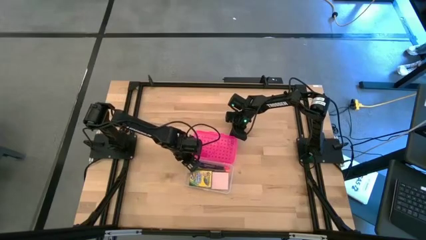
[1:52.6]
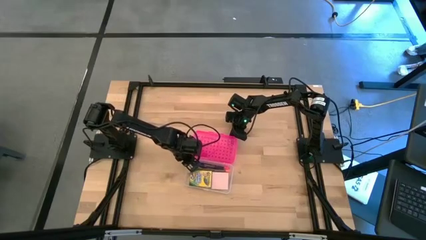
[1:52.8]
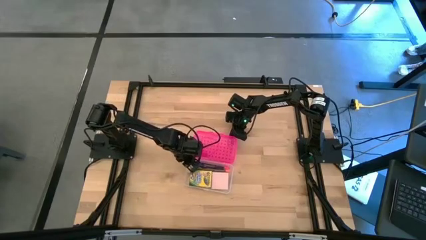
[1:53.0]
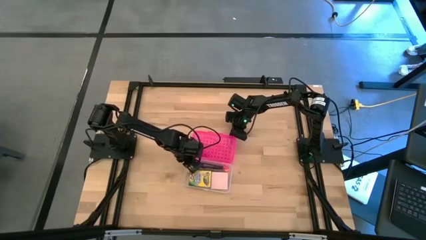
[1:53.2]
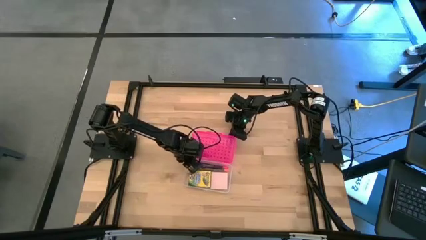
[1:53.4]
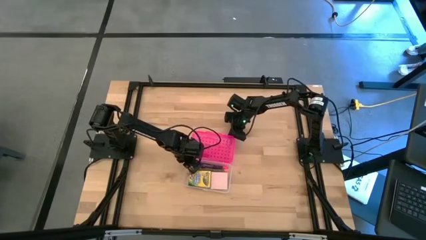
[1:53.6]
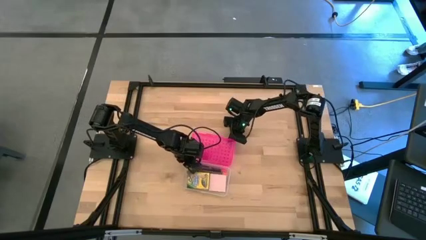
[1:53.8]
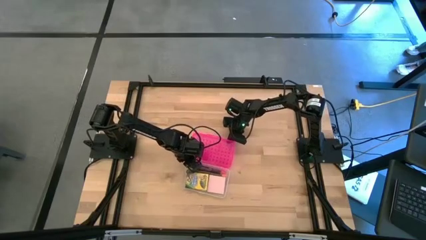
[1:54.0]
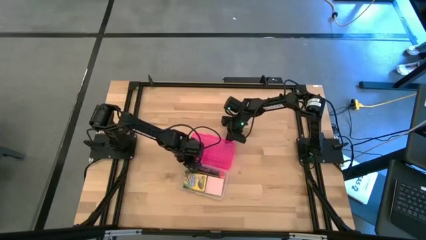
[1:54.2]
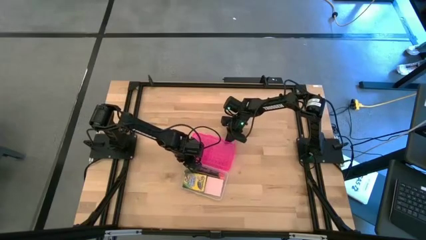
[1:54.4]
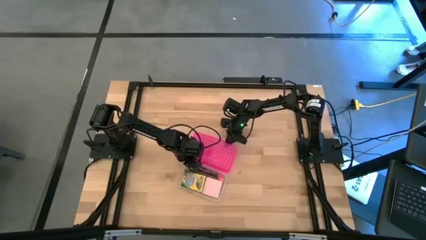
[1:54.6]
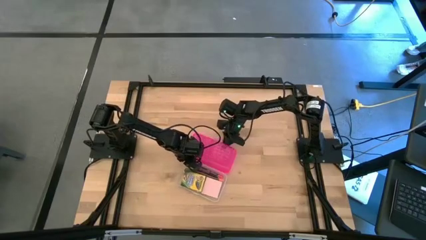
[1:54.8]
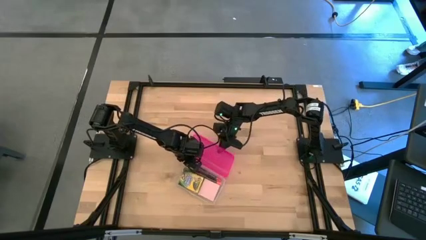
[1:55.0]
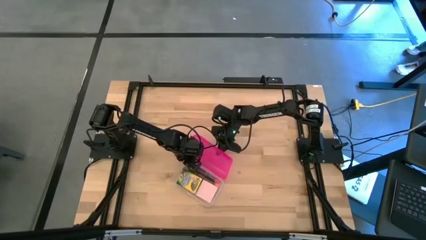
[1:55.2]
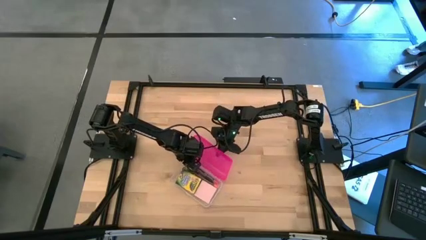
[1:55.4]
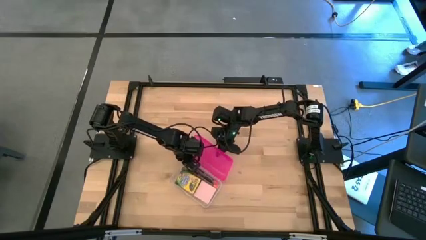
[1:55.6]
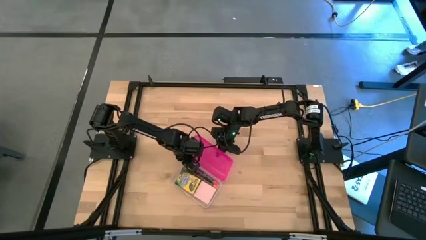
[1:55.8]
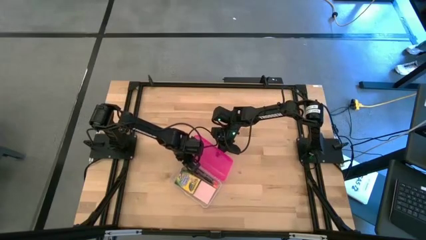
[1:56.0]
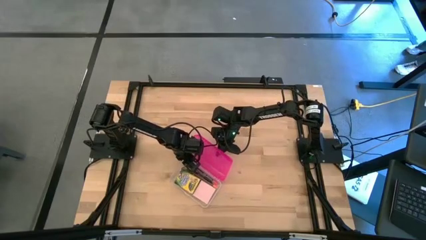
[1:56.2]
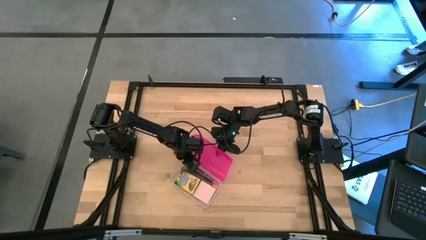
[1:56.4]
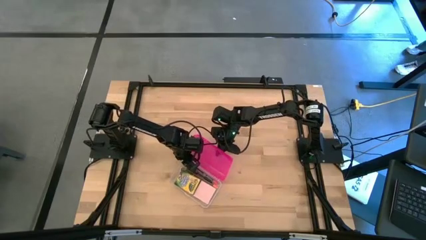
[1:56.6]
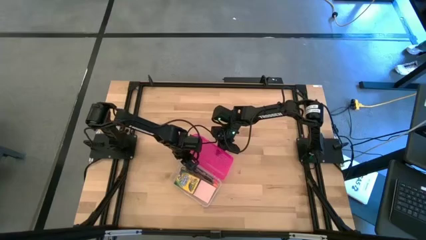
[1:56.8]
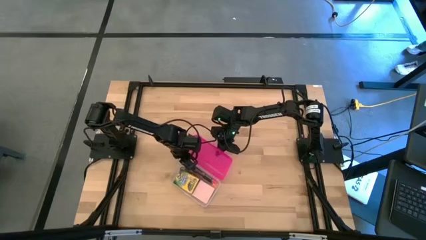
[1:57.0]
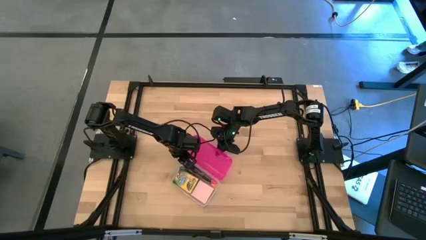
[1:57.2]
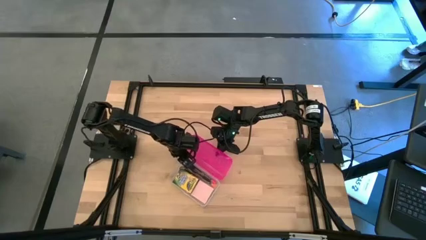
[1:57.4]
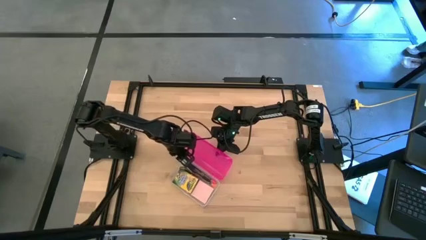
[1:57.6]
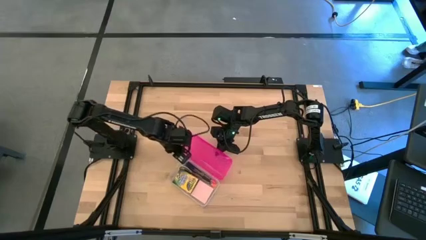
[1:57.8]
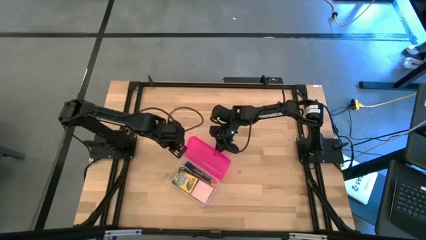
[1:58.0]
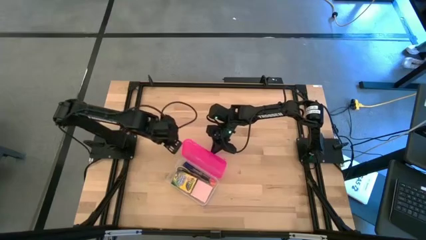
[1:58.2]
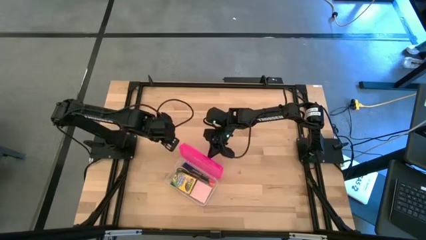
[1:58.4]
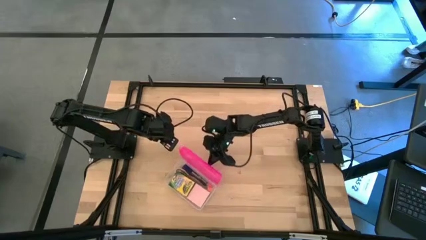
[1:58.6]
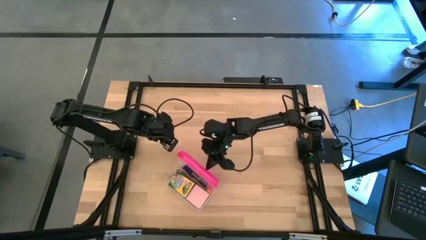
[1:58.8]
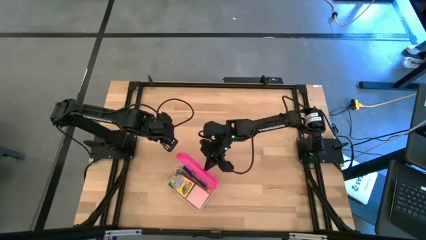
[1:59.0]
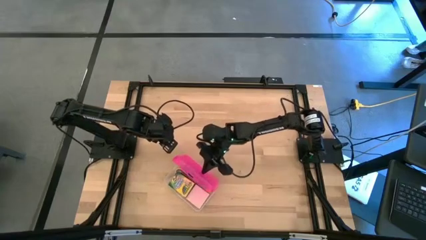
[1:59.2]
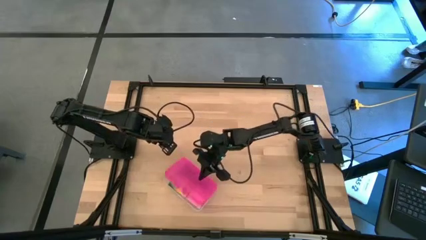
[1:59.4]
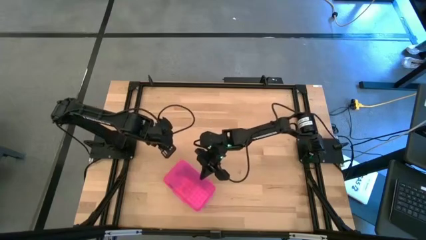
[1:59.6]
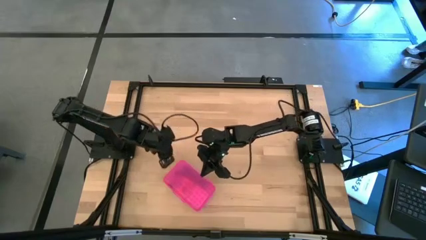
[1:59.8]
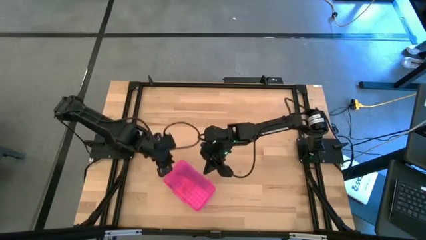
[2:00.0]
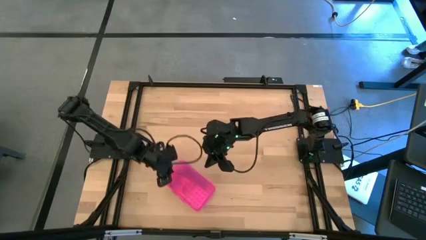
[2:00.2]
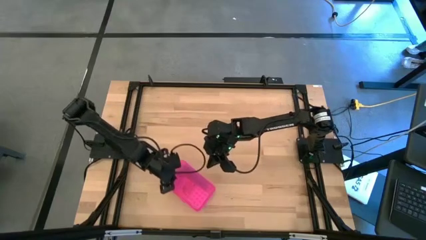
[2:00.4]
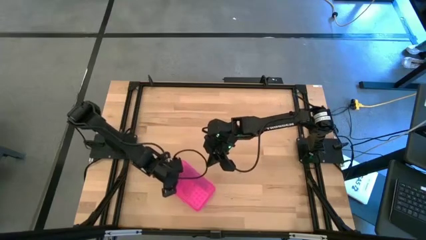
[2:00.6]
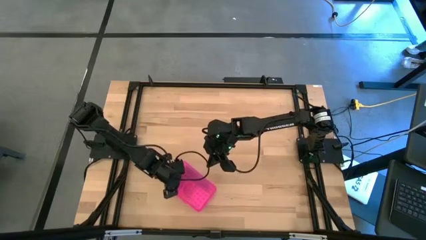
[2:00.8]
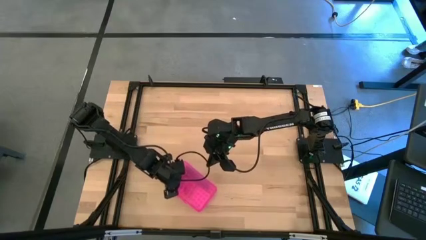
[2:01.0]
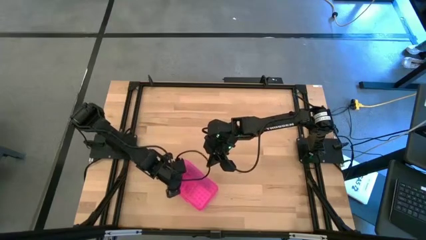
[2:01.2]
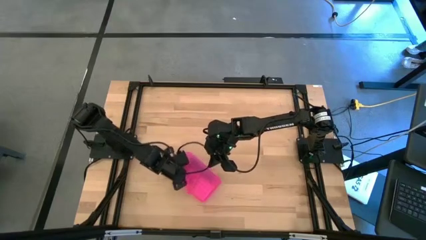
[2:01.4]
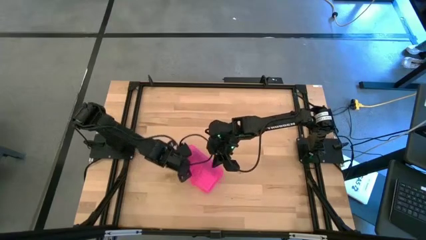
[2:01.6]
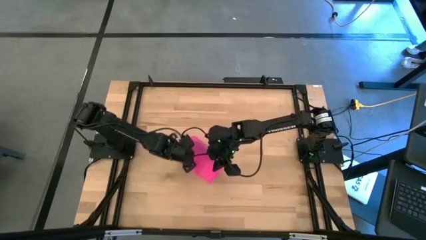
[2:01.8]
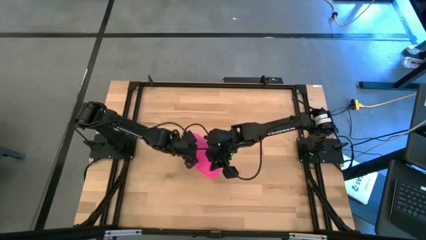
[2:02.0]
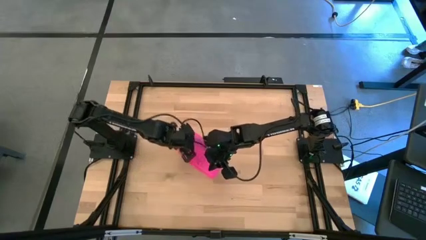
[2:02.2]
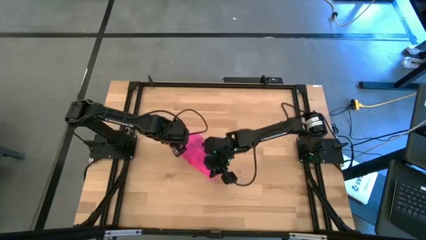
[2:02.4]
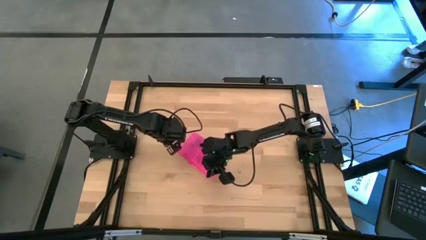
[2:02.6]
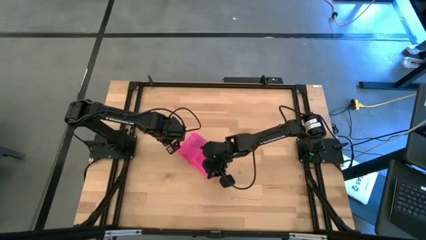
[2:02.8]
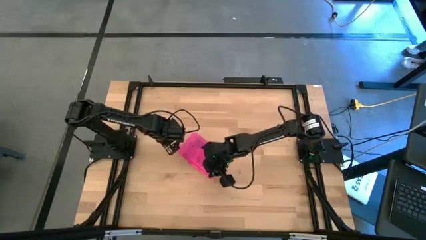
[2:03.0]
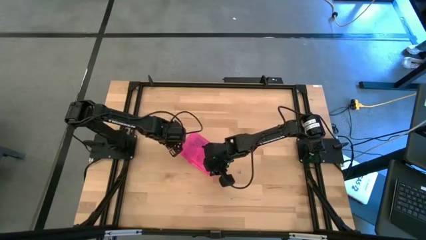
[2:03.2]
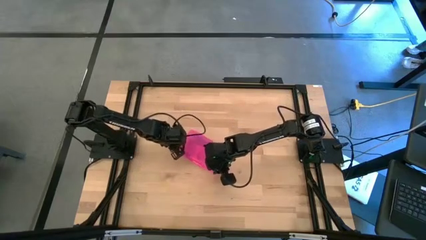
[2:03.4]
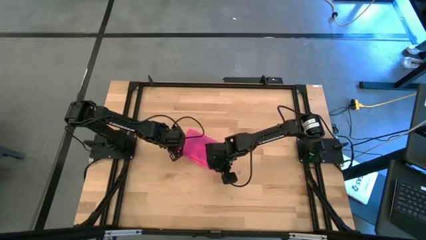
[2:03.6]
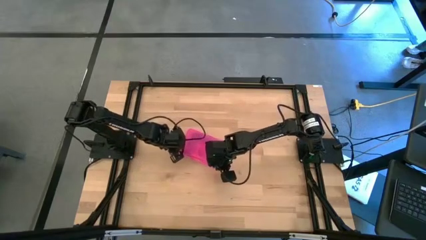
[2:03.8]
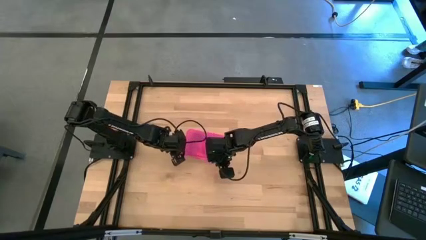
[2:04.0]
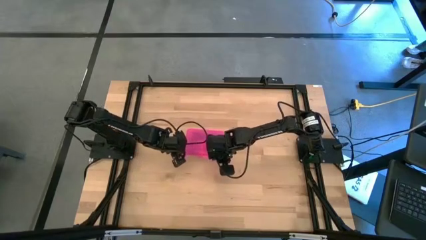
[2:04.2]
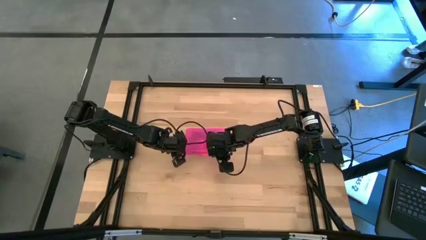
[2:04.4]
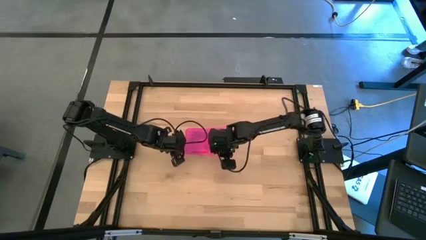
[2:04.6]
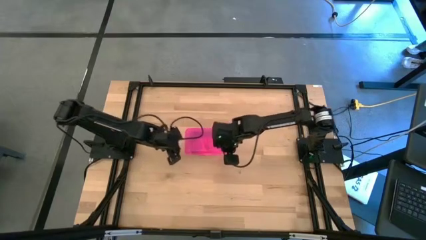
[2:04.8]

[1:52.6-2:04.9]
Task: Pack school essentials
Close the cover of the school supply organizer

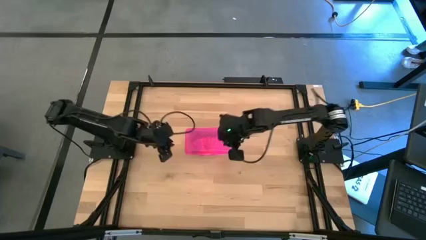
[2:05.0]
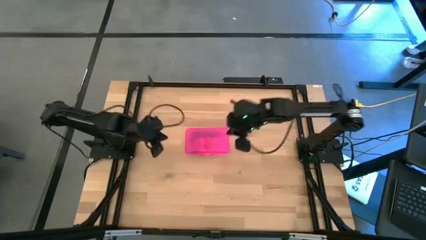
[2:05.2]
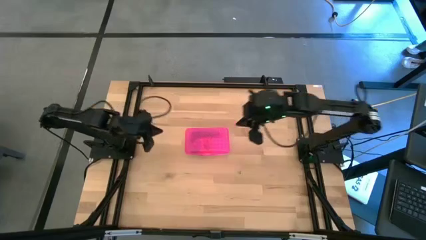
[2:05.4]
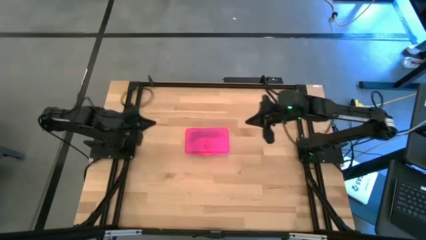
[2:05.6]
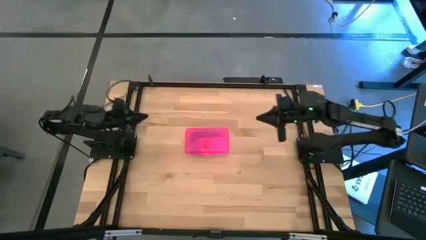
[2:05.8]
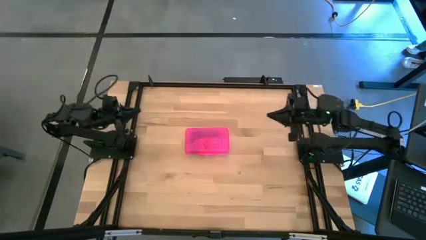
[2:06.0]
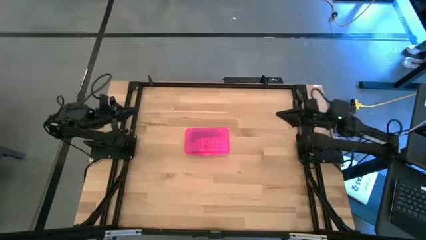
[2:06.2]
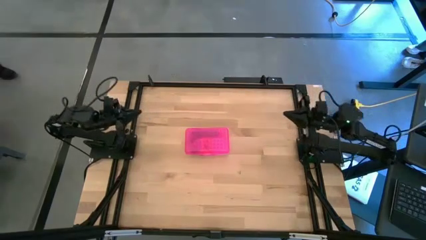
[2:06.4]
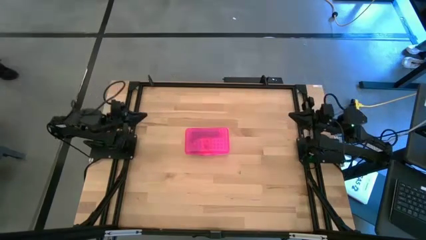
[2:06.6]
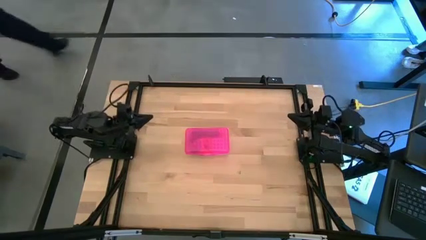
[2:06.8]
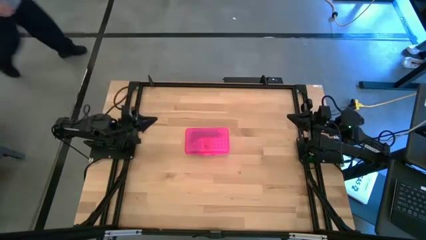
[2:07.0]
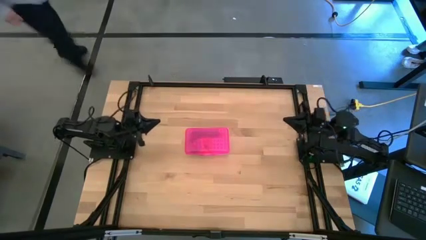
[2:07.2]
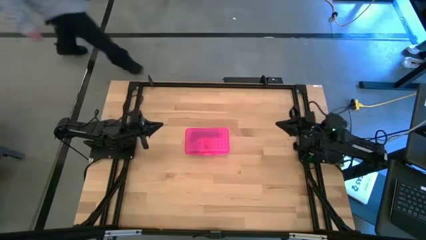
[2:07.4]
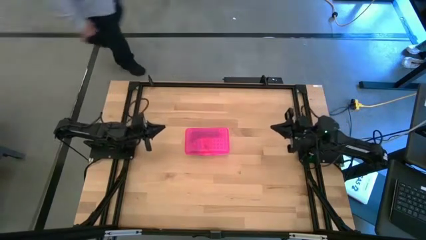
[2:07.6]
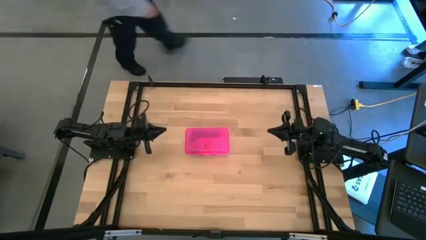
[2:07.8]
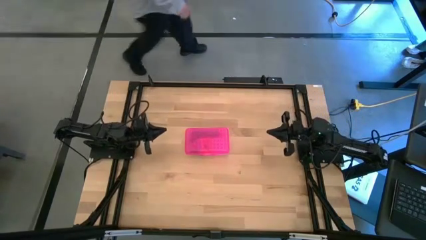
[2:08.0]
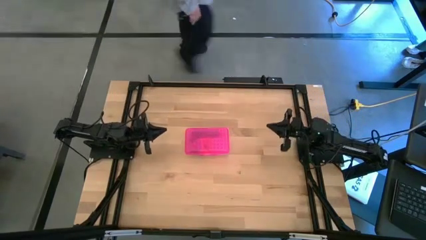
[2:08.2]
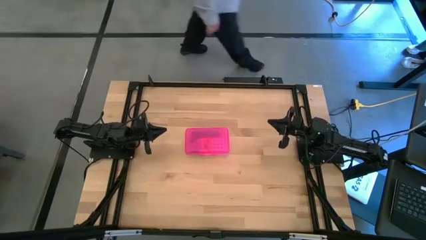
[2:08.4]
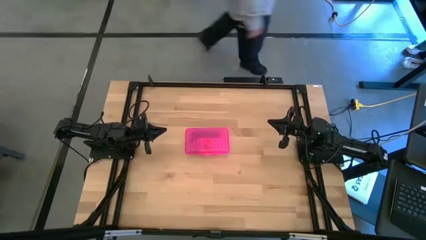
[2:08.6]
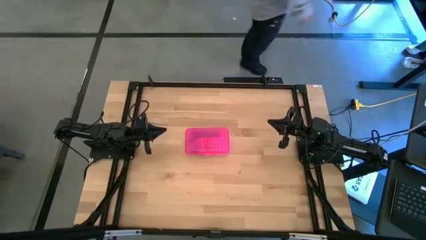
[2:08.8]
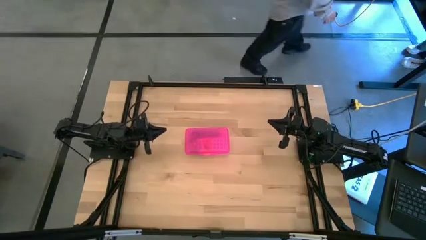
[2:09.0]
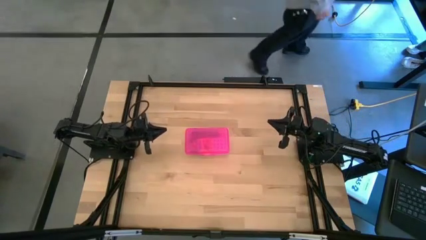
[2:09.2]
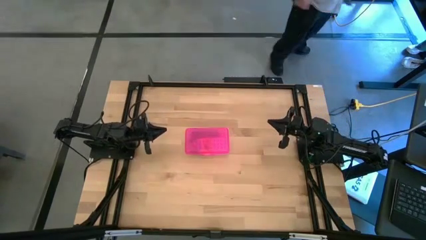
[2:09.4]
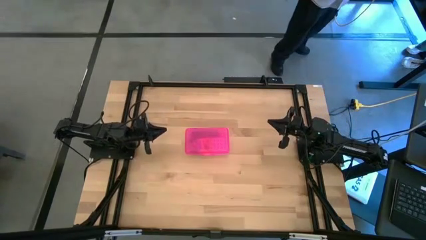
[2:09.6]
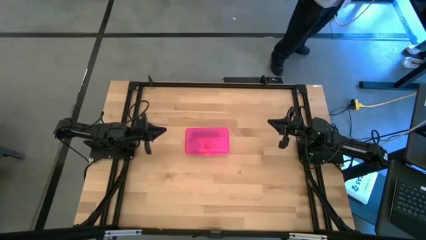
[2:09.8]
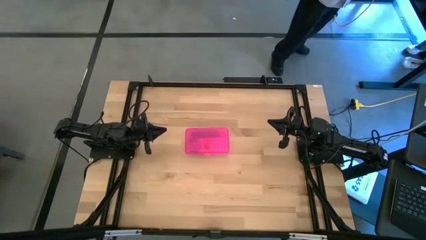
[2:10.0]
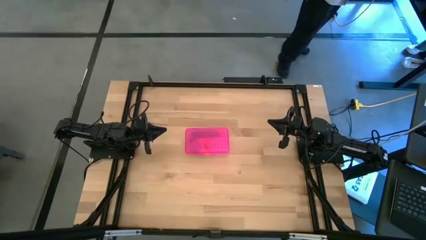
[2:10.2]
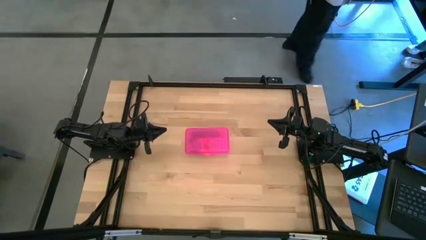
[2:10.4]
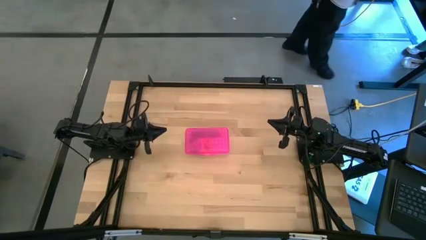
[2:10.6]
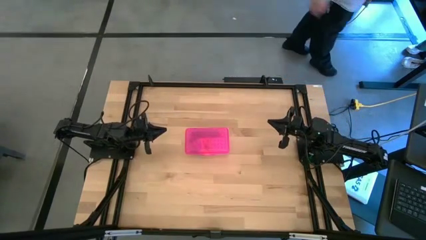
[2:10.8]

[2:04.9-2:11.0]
Return to home position
